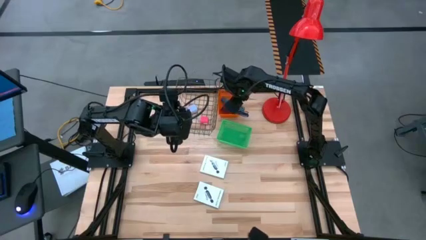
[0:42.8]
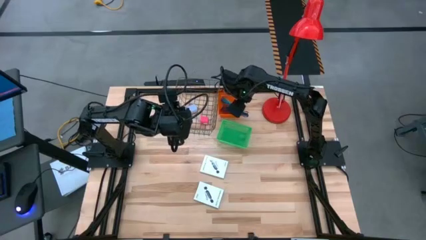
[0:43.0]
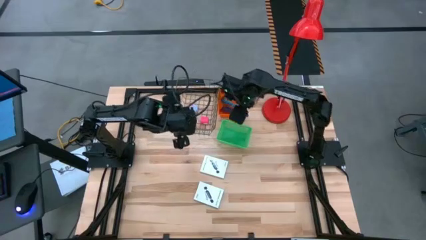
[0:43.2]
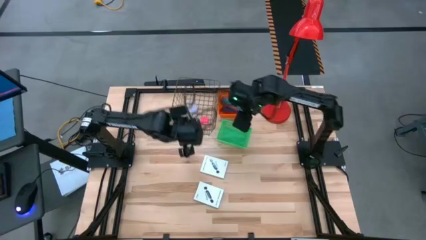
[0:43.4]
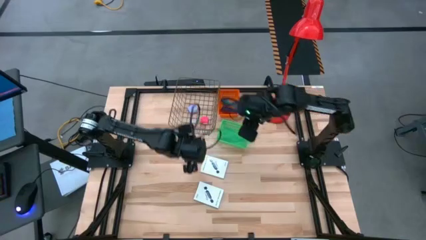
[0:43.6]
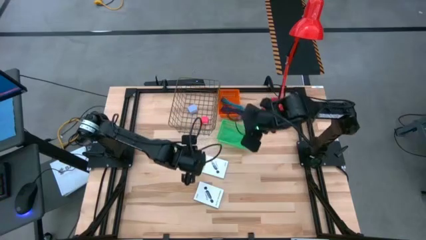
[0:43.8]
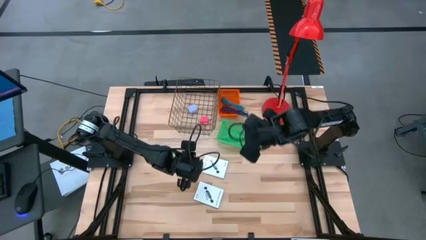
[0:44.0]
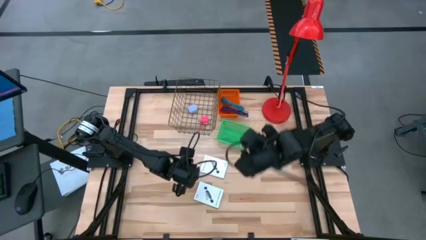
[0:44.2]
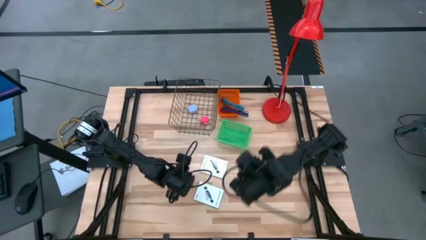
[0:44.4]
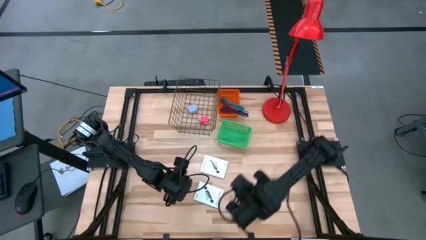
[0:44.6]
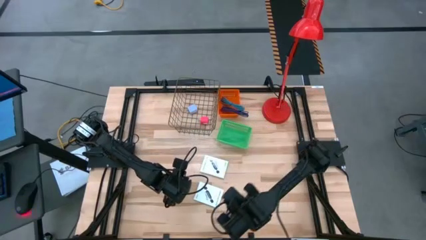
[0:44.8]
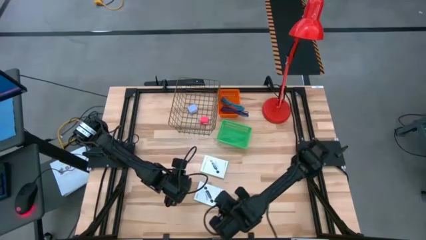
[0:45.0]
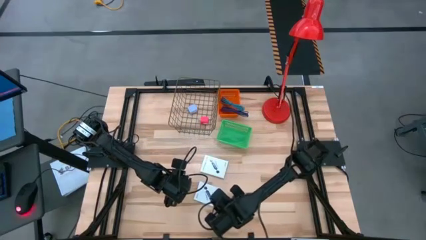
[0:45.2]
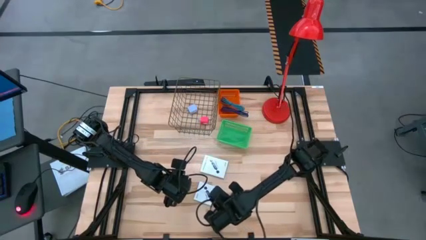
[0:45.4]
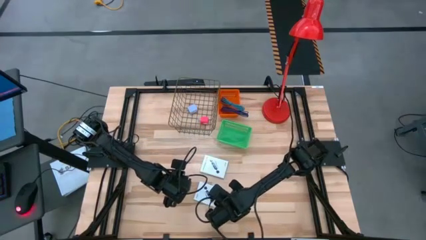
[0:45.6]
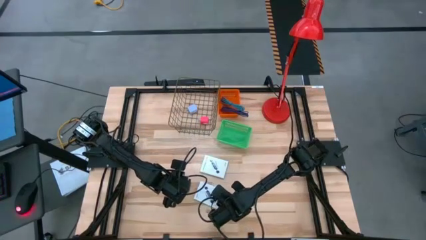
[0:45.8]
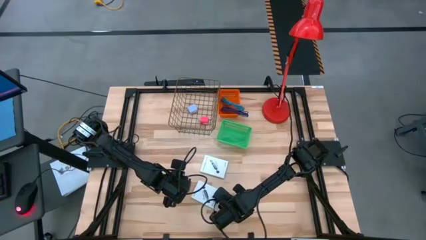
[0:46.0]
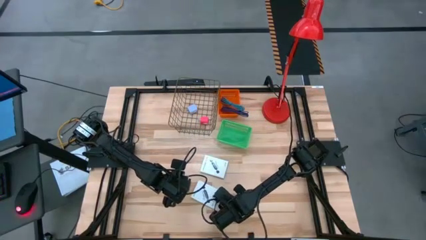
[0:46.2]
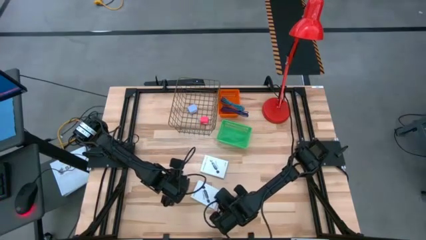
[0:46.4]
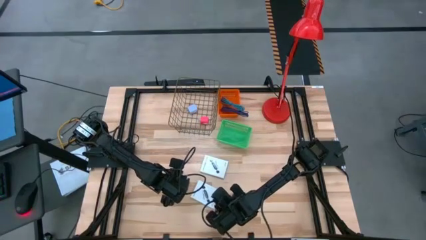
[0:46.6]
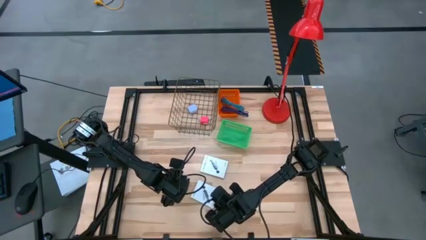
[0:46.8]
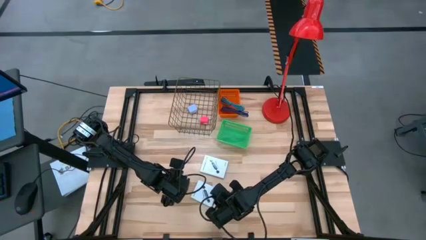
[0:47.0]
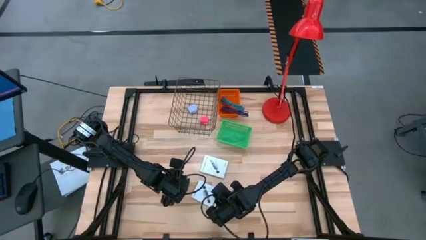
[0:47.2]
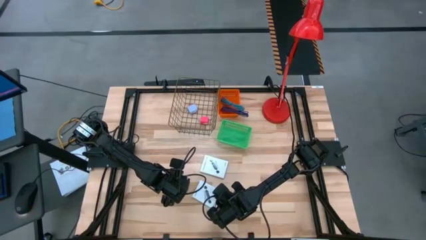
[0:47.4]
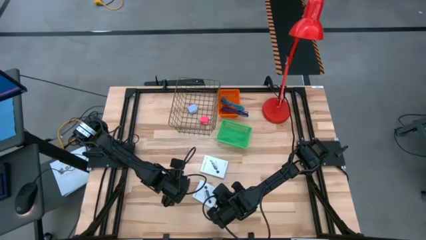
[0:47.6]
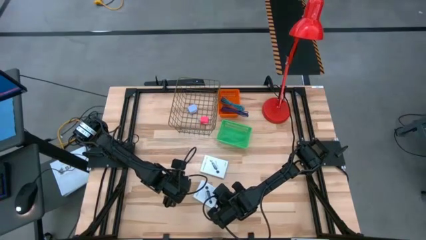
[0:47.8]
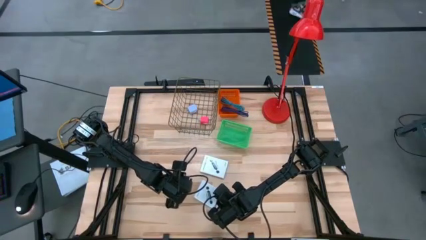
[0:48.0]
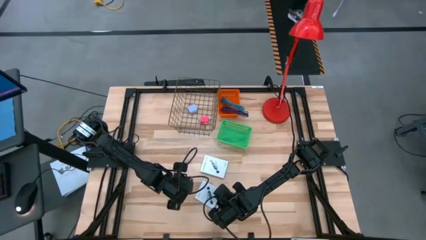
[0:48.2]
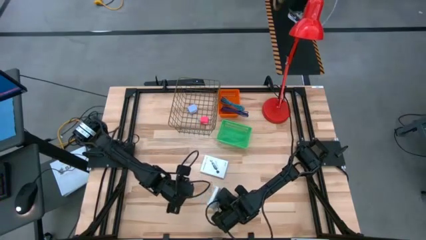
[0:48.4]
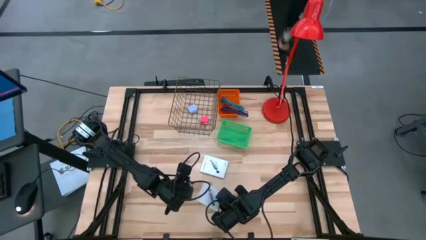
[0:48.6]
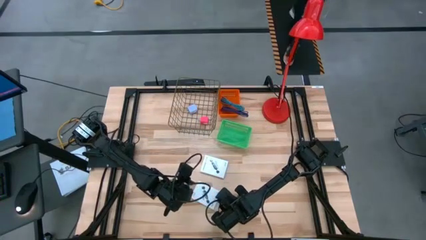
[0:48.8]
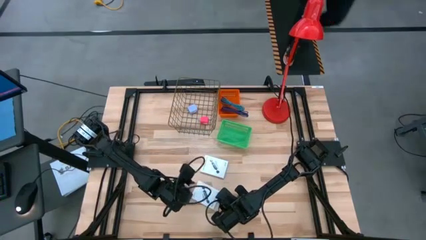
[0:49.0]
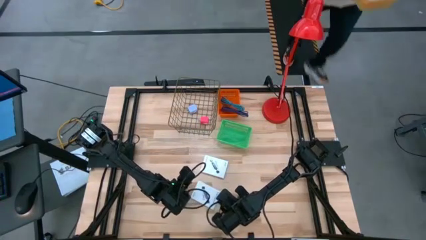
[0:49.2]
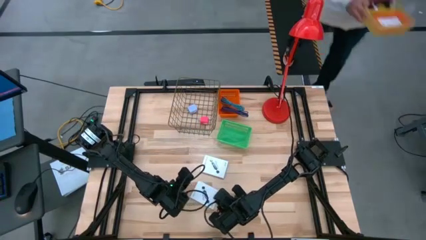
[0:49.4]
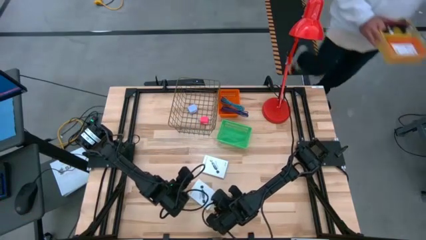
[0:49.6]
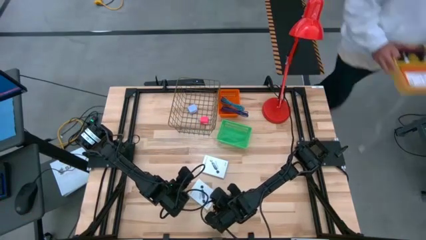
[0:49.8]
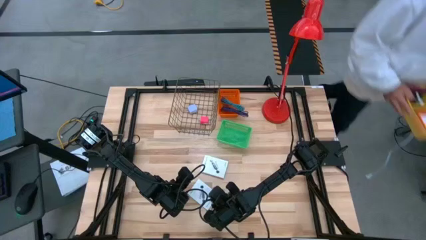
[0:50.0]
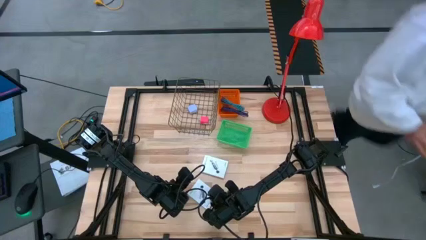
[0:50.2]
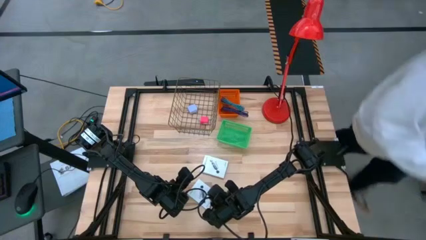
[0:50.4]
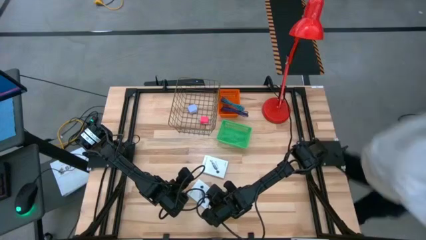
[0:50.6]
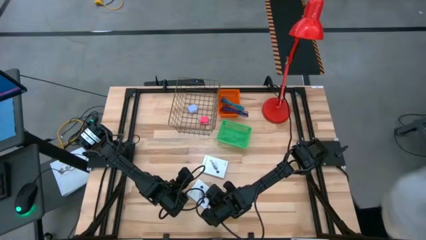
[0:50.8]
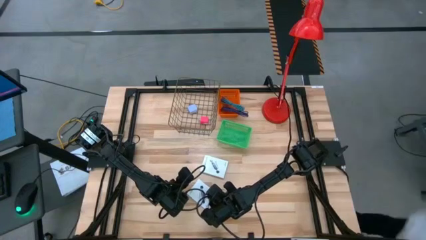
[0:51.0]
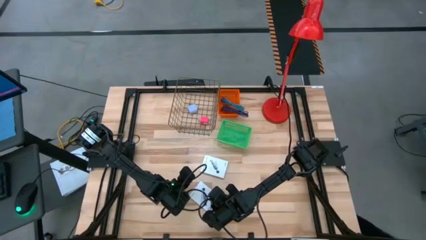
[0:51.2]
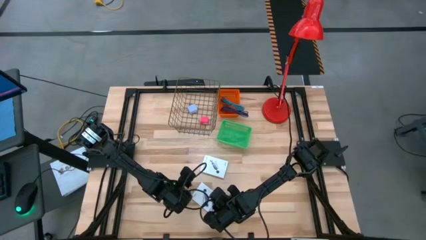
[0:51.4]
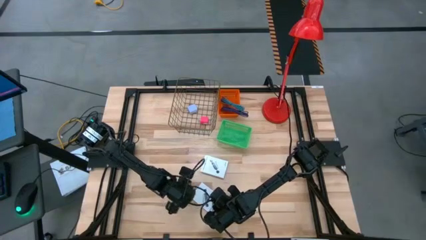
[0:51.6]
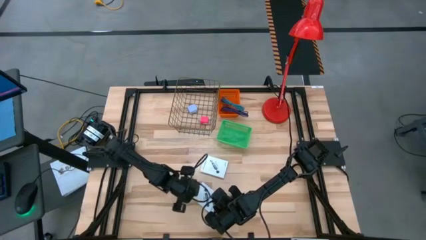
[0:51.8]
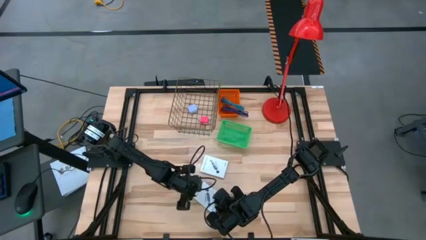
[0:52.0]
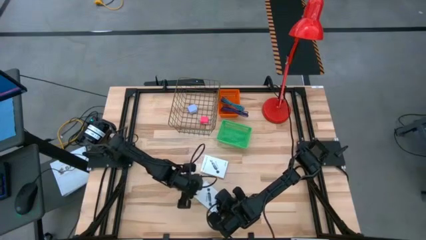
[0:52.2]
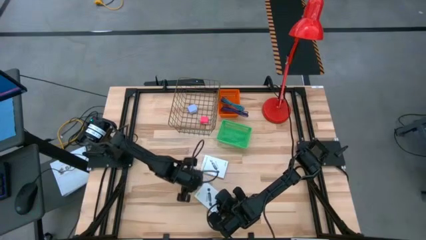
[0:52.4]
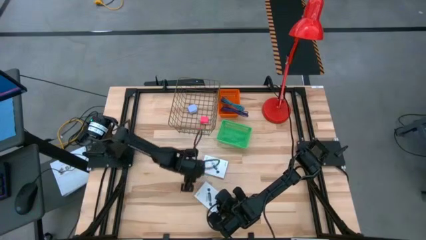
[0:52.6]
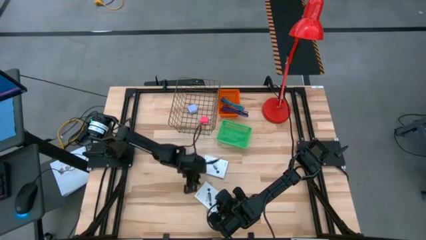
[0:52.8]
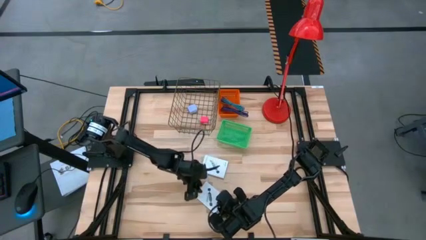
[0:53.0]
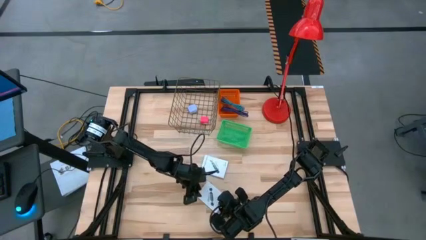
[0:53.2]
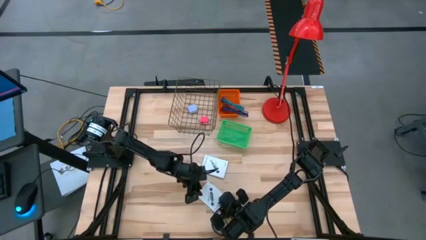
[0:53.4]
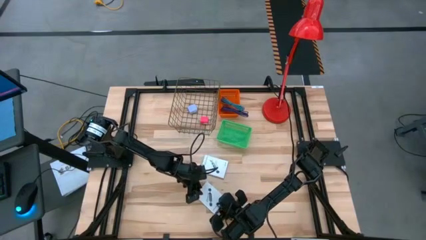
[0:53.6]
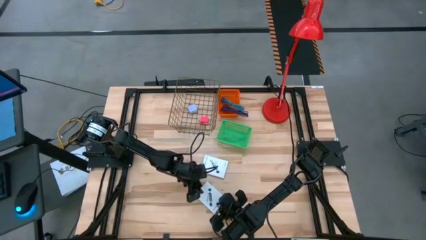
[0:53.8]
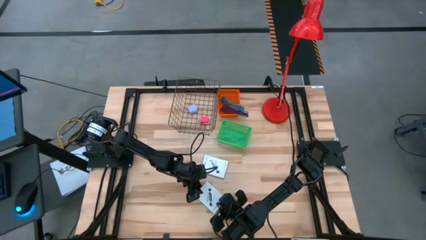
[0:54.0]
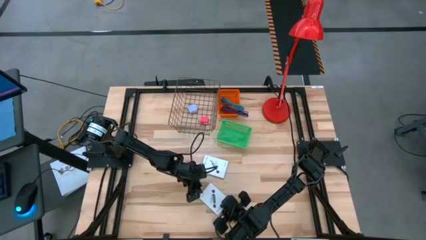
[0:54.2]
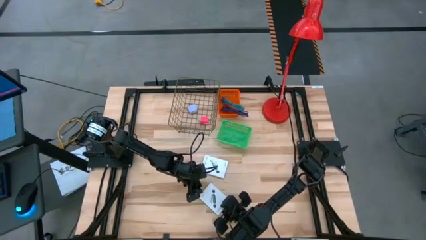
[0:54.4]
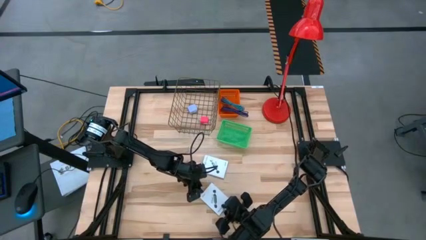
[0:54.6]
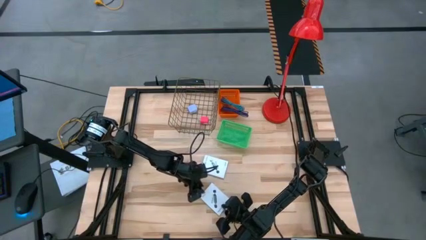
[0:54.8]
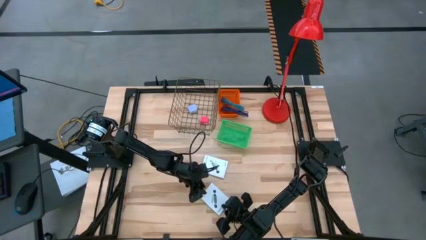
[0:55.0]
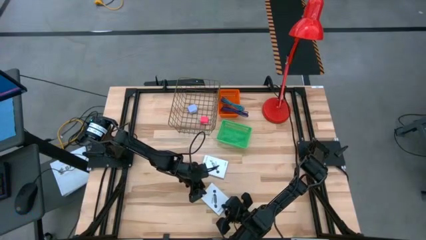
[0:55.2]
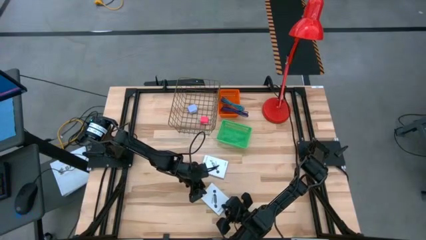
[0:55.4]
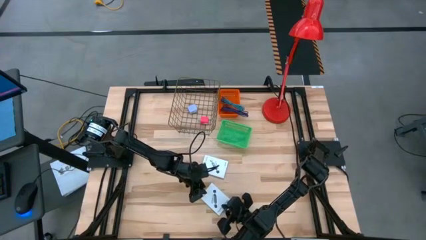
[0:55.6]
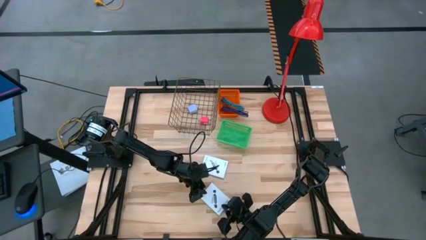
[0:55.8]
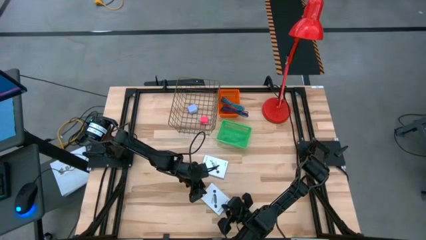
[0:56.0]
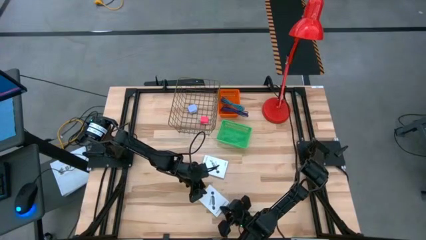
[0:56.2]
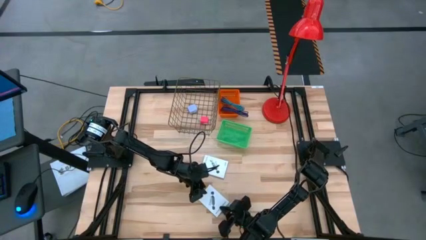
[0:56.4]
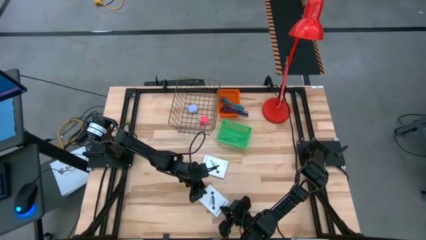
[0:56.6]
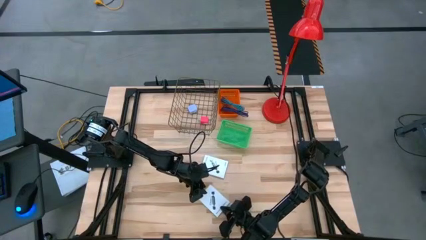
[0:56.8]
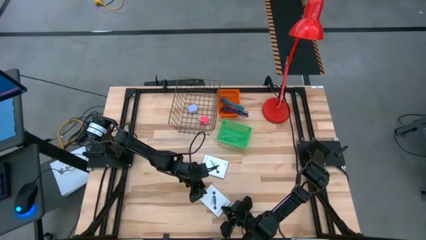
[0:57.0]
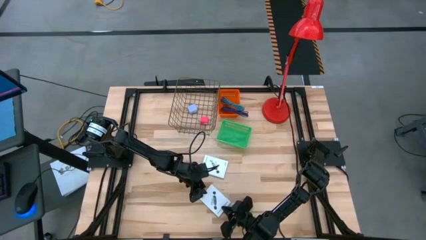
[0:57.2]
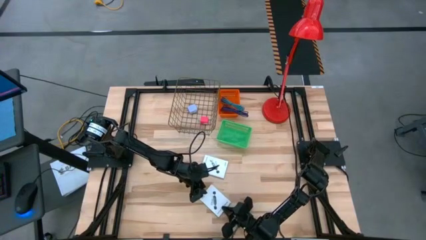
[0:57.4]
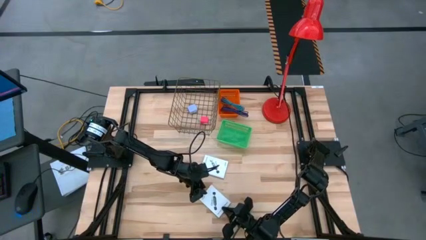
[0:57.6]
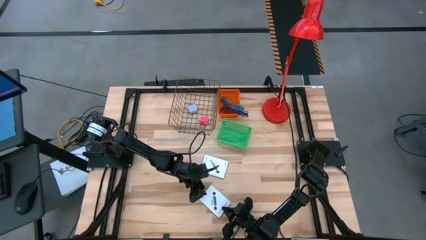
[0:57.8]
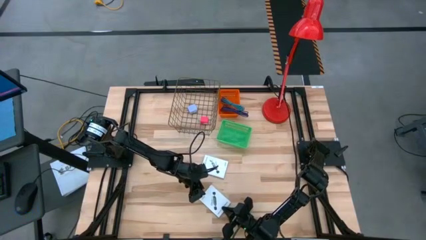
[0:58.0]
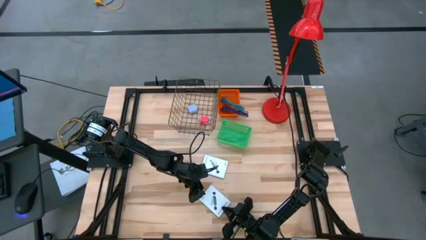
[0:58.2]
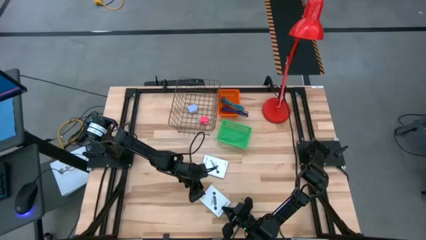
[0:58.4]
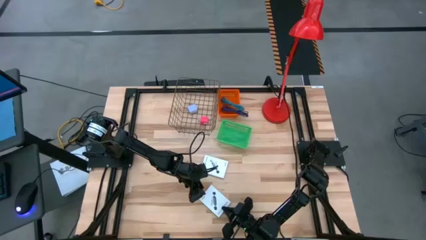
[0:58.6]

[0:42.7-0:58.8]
Task: Pick and place items into bin
Put the top card reader box into the green basket
